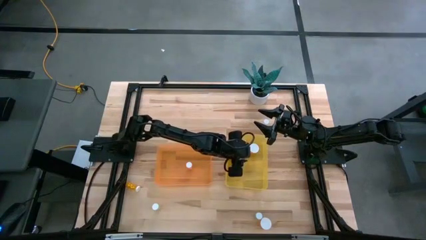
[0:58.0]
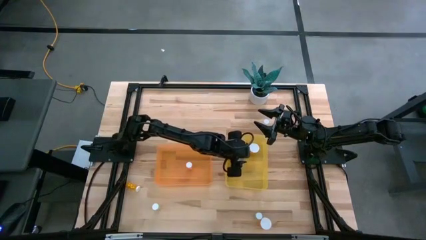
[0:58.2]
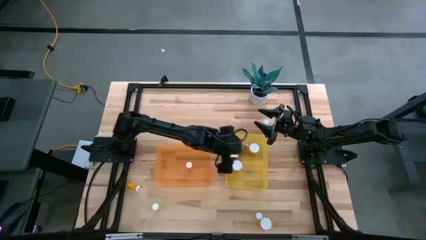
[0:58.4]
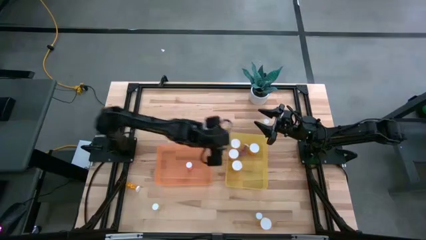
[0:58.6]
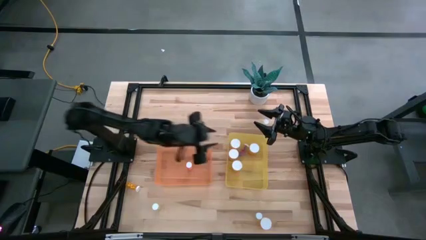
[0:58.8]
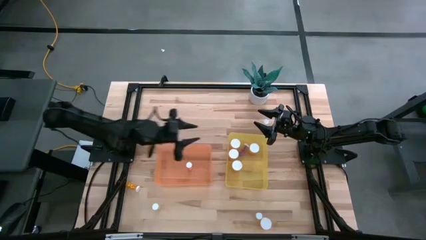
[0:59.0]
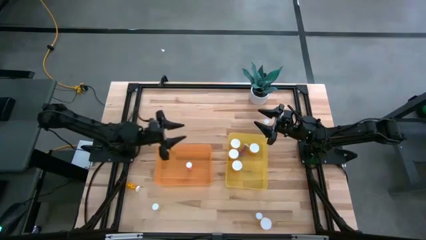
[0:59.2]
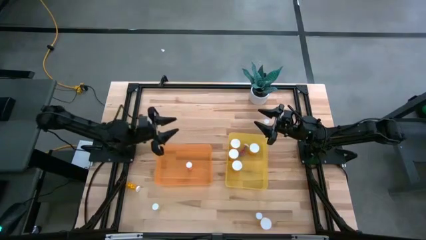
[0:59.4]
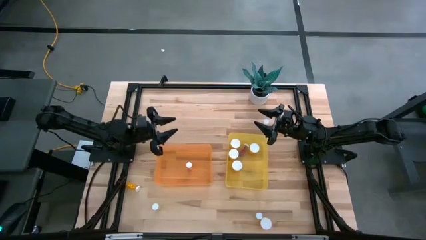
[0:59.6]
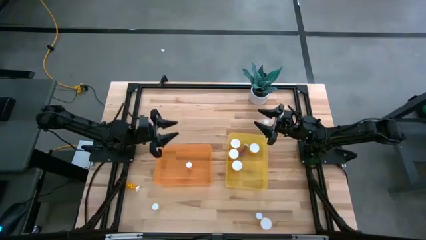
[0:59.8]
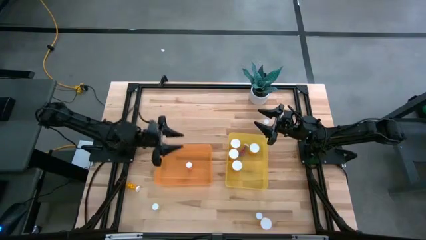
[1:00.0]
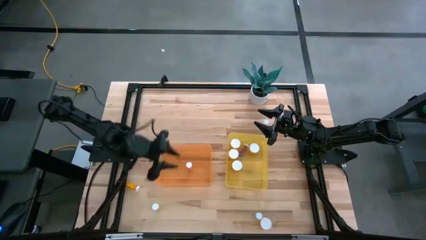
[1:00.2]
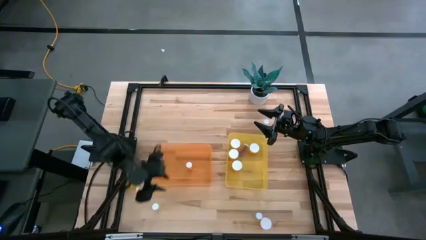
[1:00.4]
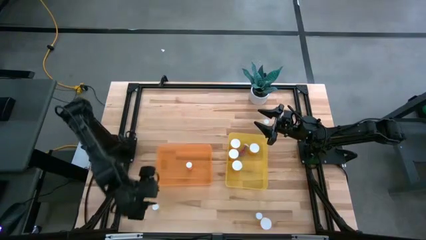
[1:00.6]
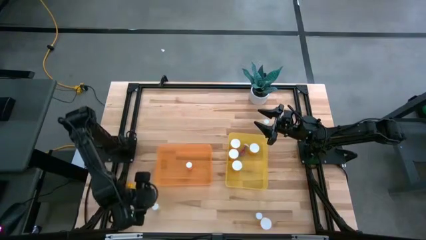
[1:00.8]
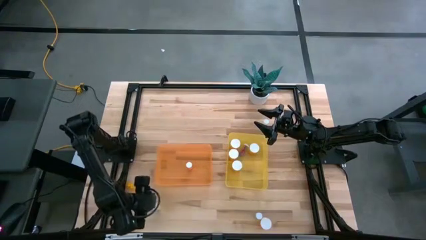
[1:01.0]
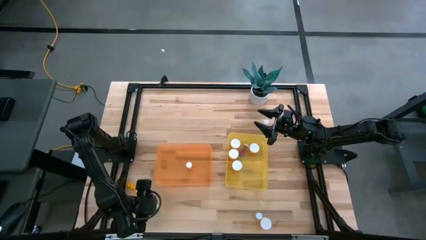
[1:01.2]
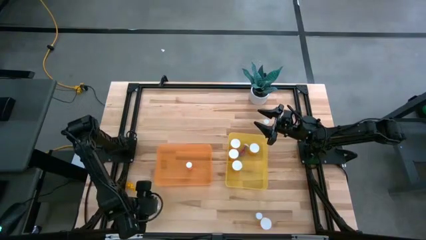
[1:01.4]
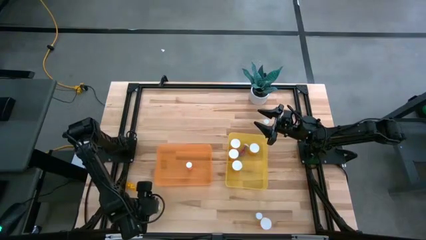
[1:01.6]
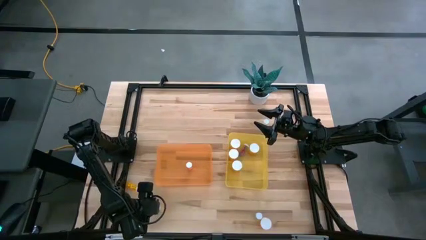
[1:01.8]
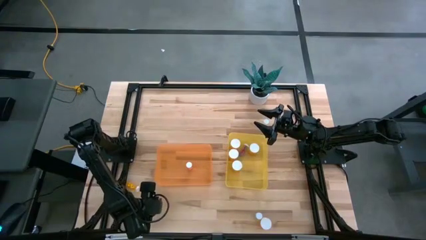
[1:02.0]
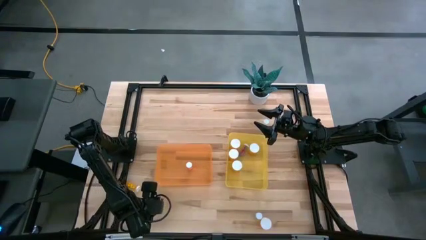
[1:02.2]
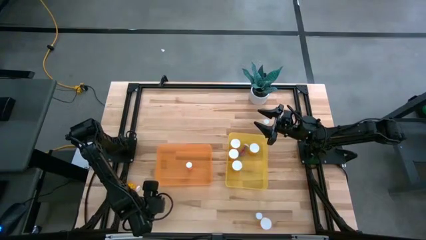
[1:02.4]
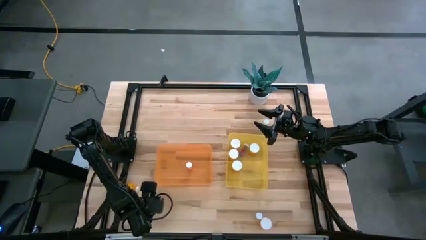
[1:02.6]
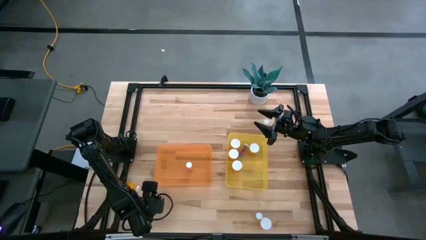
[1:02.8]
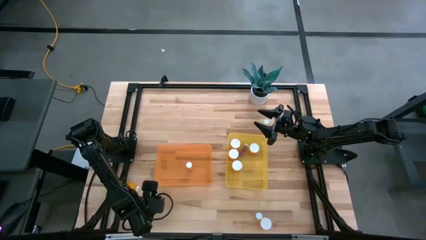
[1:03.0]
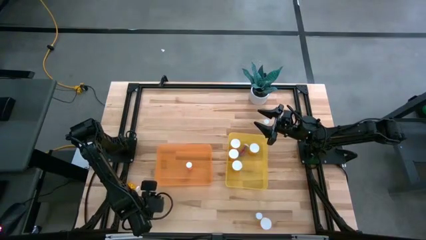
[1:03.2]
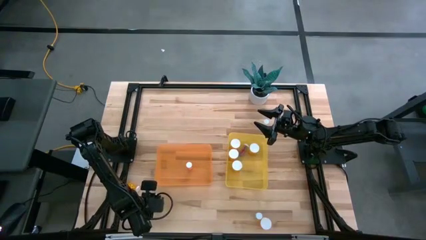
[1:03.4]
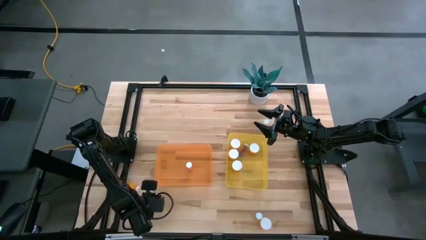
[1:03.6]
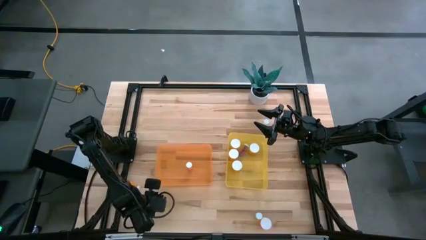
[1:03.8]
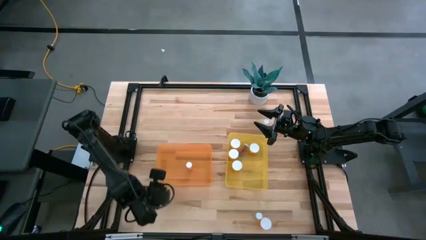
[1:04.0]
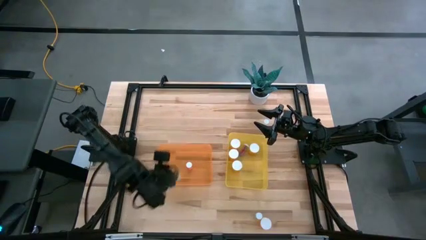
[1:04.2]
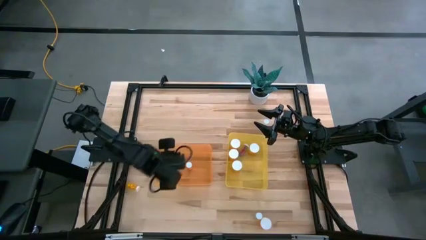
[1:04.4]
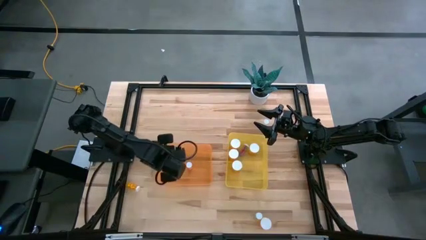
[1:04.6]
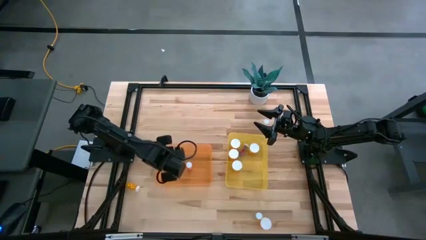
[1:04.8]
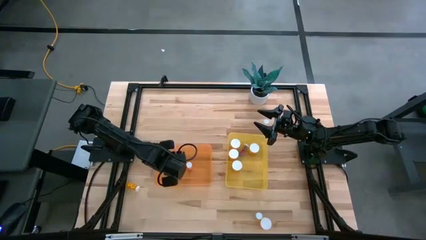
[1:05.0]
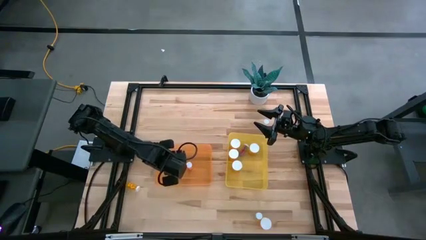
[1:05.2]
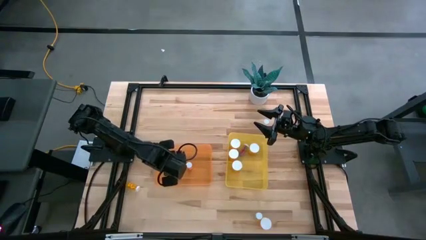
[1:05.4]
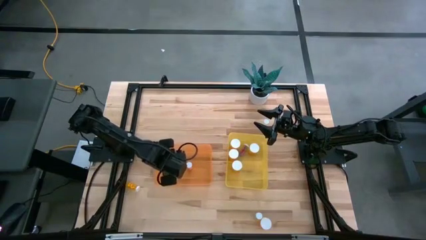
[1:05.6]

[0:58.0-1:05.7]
Task: Pick and place medicine bottles into bin by pill shape (circle, oval)
Put the bottom yellow tablet bottle into the orange bin

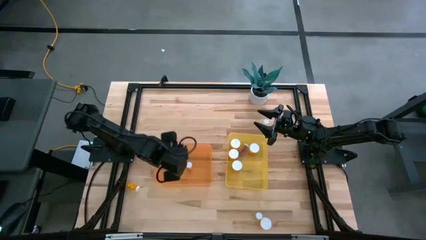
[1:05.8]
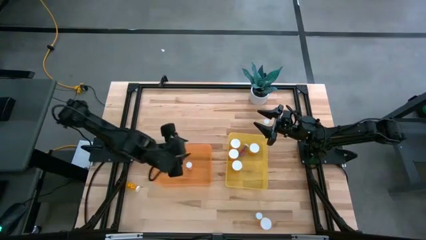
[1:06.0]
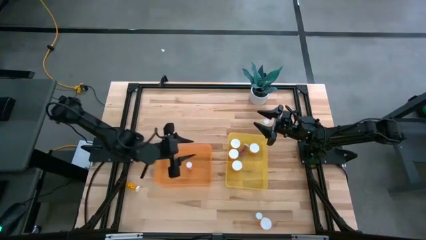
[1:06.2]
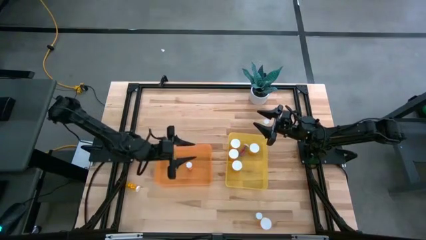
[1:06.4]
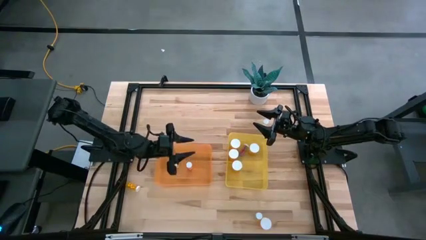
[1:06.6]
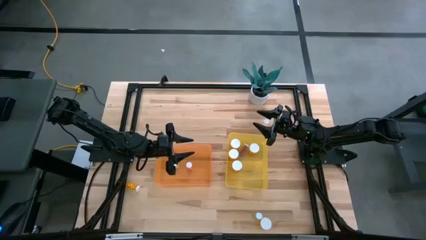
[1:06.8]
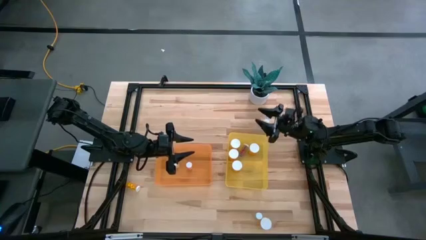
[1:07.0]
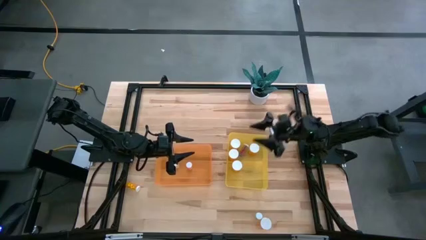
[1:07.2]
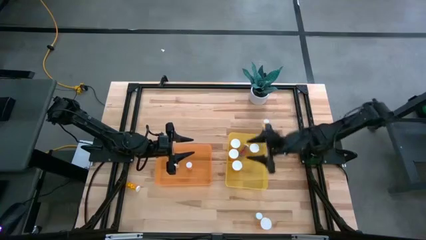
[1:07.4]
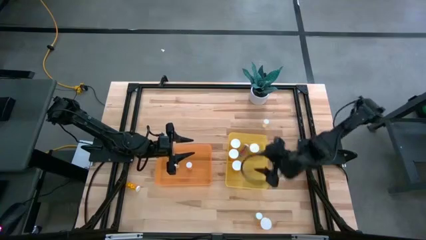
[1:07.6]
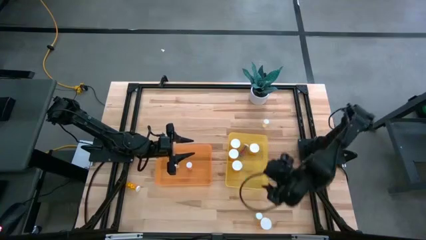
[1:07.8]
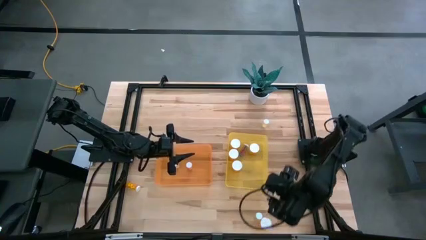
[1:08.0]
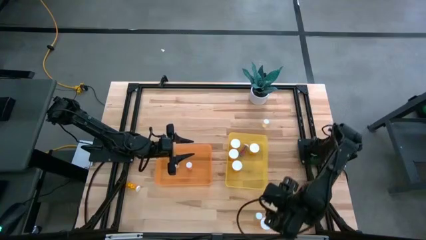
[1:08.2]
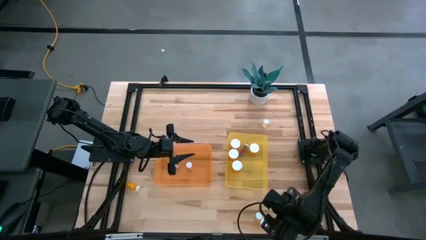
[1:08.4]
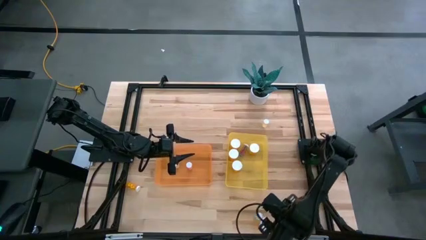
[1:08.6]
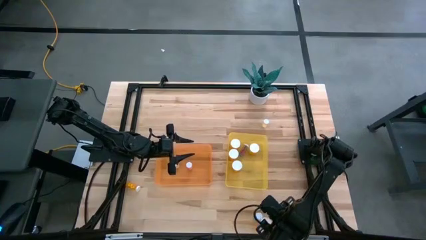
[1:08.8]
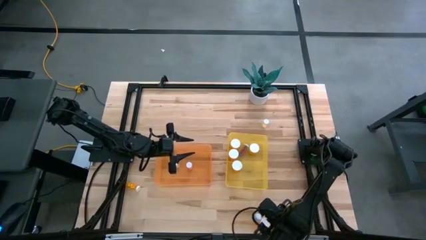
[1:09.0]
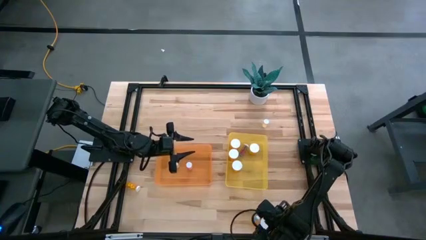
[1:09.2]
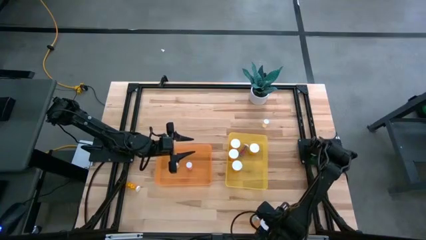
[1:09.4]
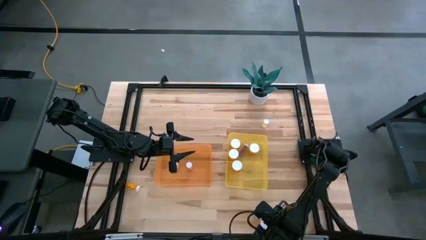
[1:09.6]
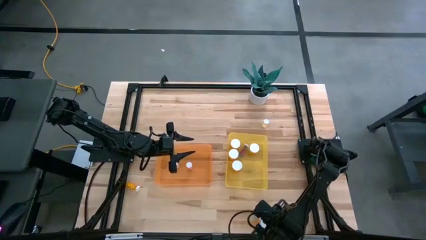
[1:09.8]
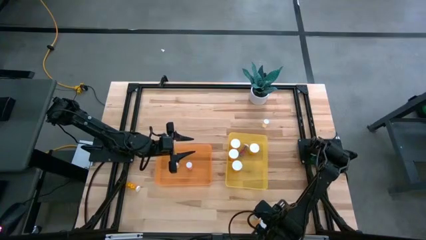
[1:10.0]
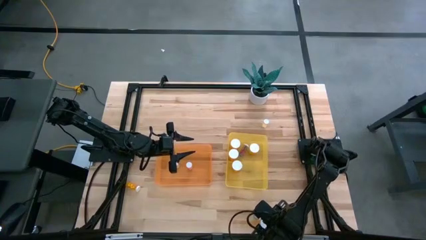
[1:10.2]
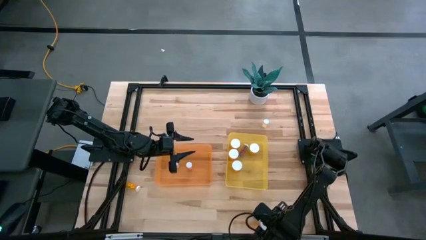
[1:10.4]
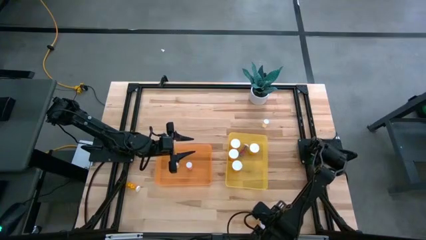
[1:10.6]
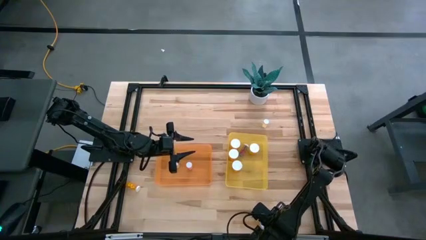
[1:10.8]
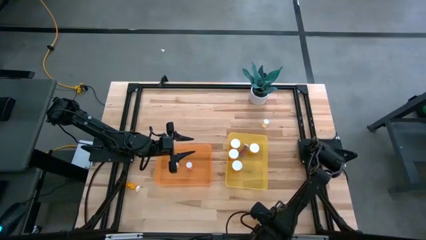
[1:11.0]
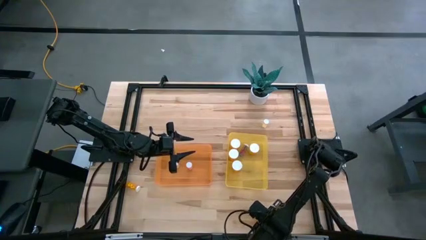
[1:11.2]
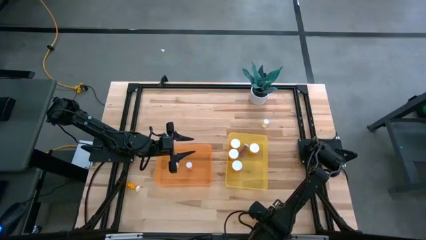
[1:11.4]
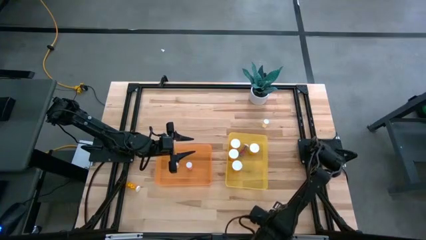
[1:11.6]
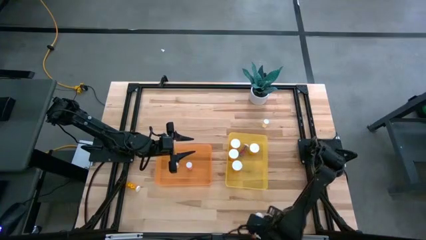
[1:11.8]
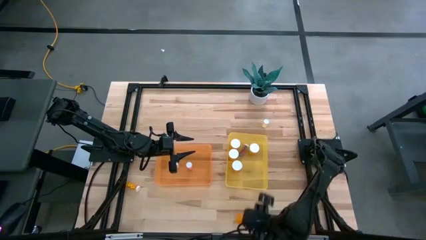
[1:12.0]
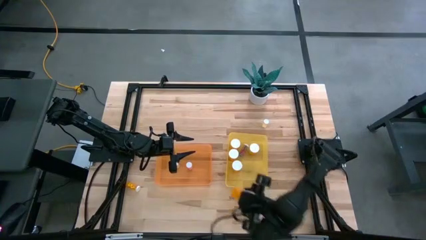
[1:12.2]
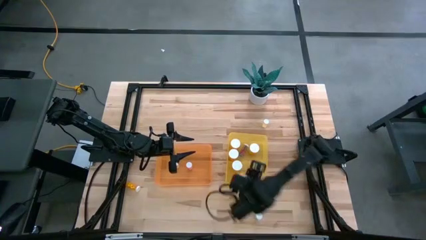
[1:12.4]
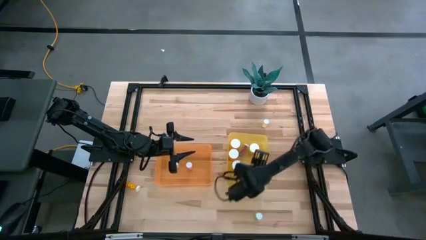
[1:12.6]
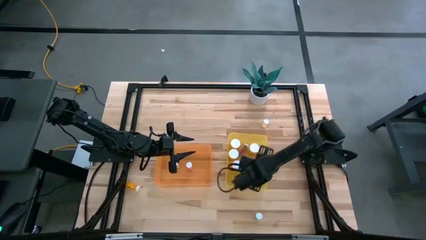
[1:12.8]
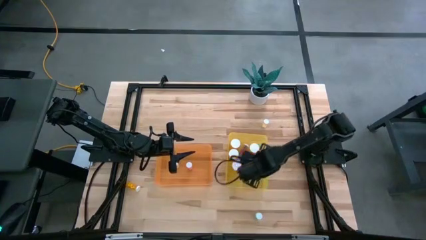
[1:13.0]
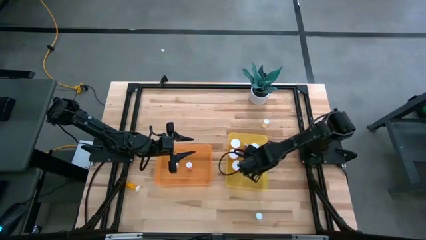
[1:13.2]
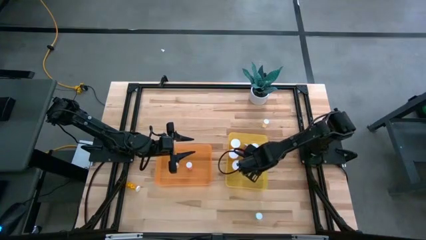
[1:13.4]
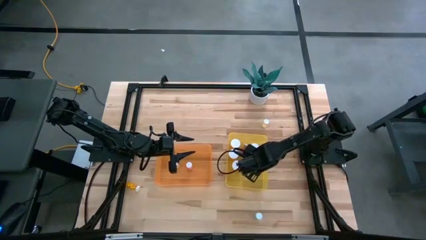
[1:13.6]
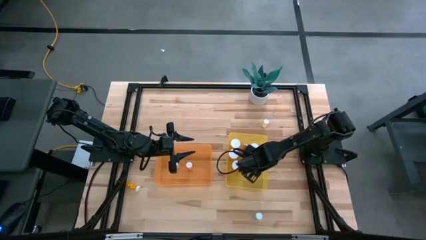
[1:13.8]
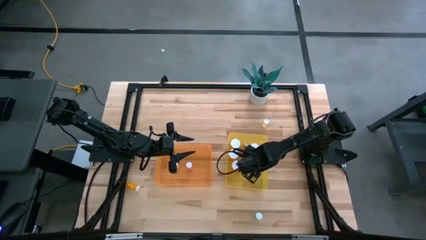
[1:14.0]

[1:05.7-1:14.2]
Put the orange capsule bottle into the yellow bin

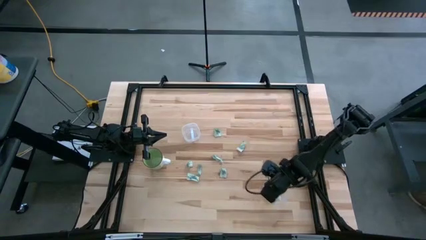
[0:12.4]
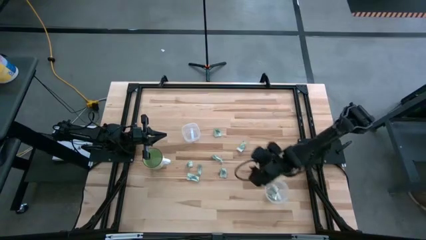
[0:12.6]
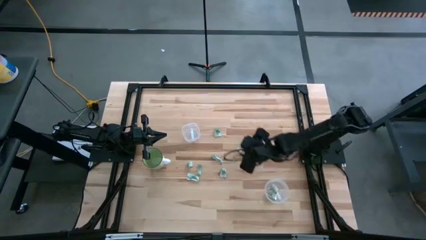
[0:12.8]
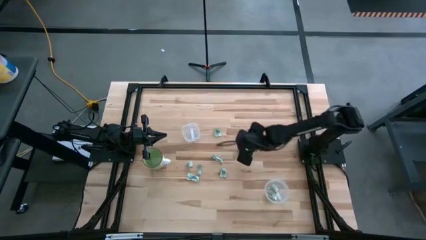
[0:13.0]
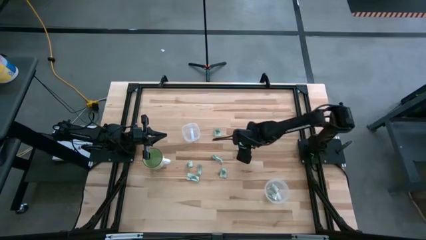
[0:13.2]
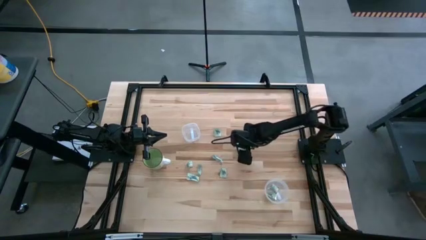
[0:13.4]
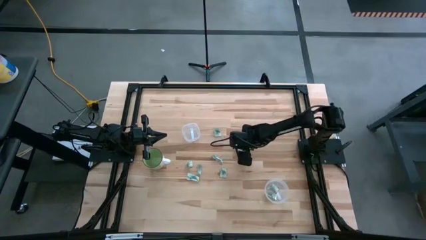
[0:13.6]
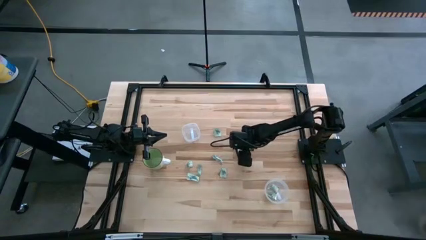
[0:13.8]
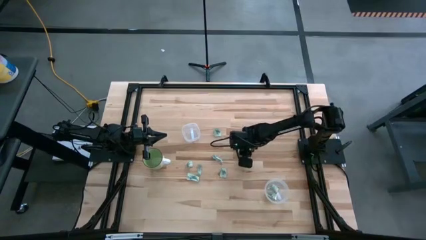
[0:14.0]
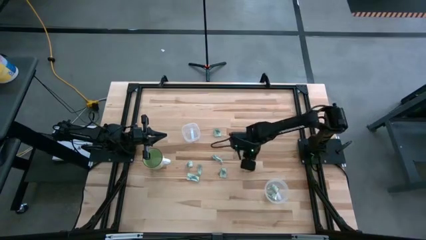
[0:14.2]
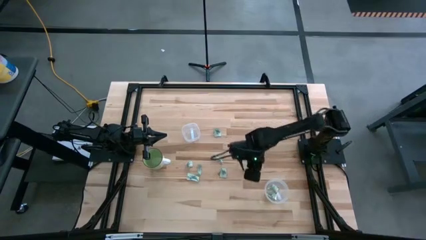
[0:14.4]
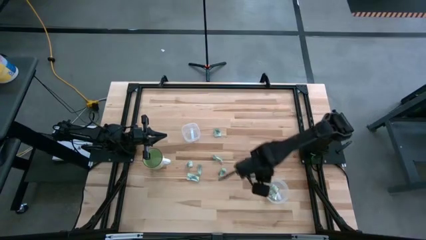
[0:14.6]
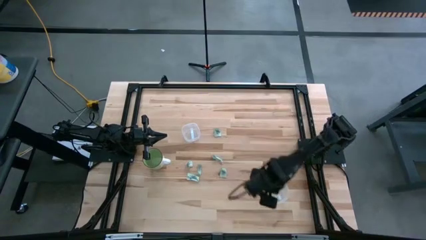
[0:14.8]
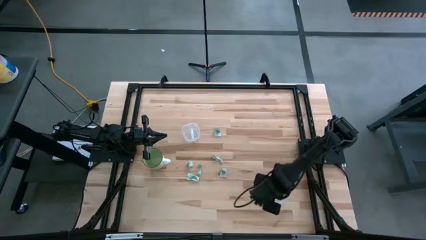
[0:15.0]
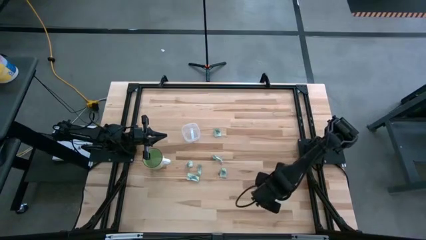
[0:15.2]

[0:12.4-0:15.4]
Task: Pick and place items into bin
Put the green stevia packet into the bottom transparent bin
